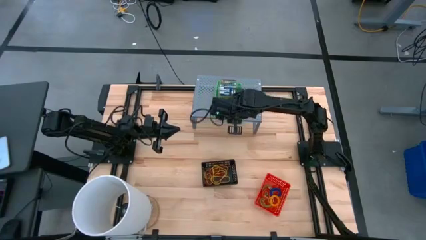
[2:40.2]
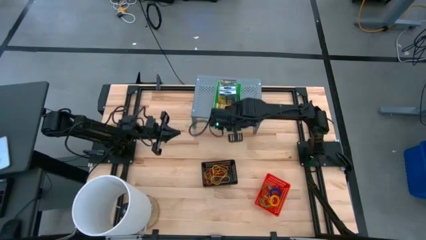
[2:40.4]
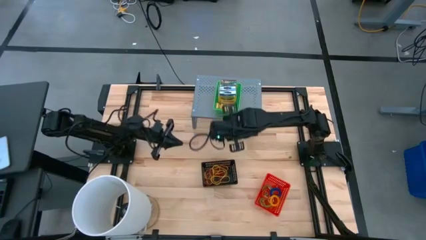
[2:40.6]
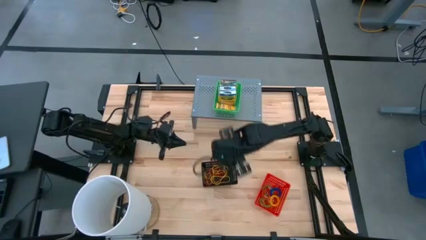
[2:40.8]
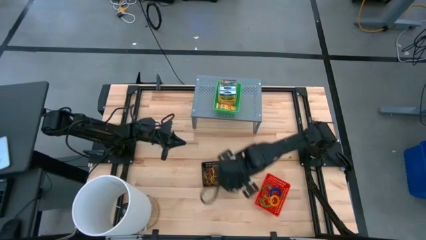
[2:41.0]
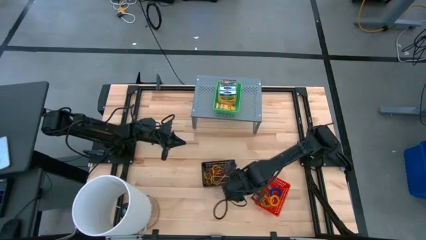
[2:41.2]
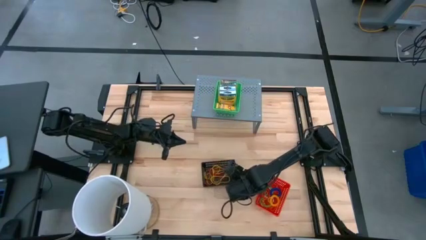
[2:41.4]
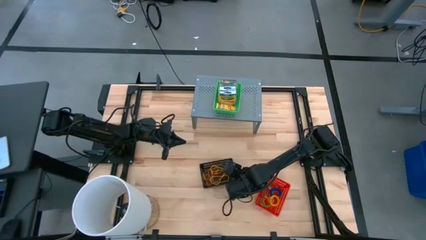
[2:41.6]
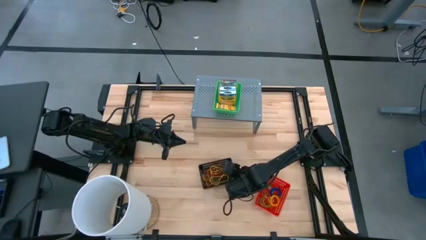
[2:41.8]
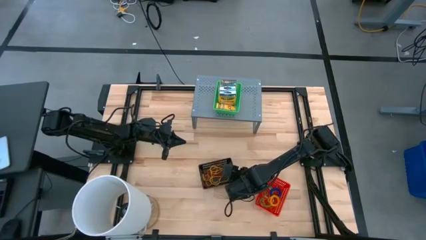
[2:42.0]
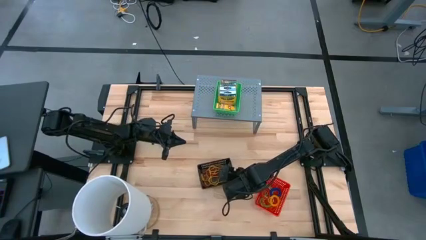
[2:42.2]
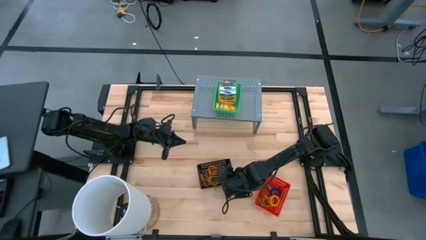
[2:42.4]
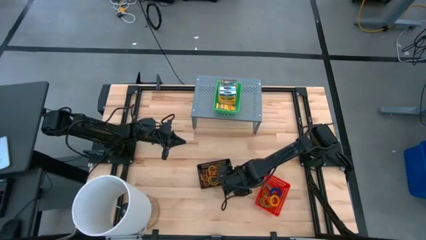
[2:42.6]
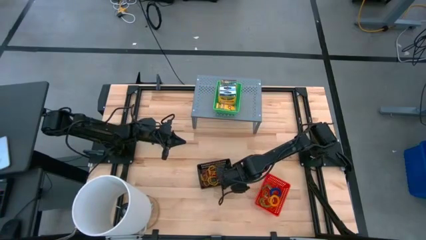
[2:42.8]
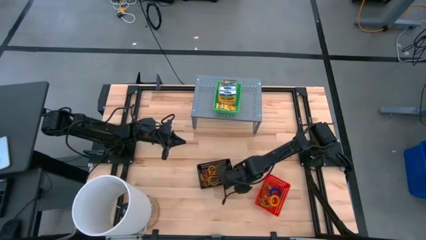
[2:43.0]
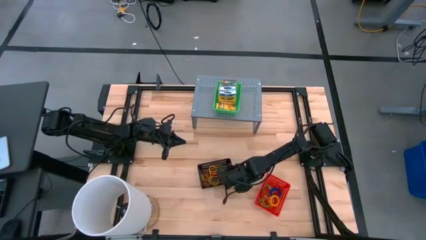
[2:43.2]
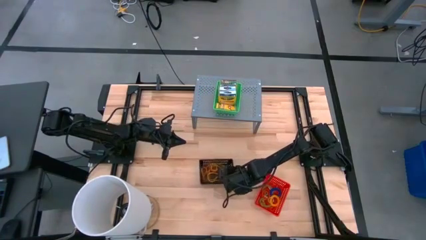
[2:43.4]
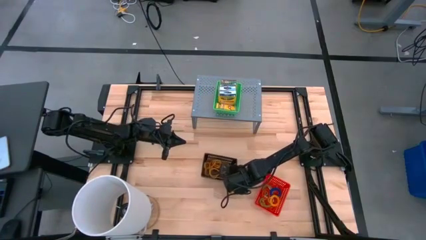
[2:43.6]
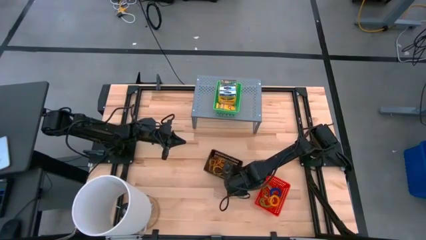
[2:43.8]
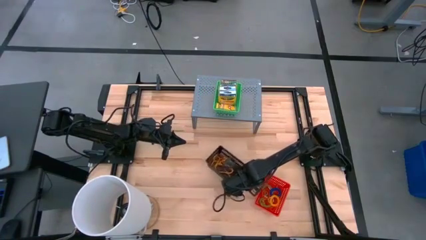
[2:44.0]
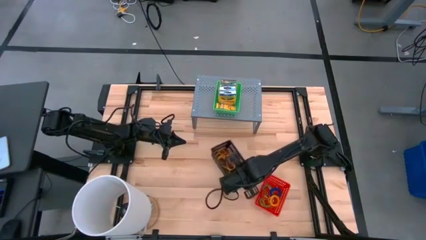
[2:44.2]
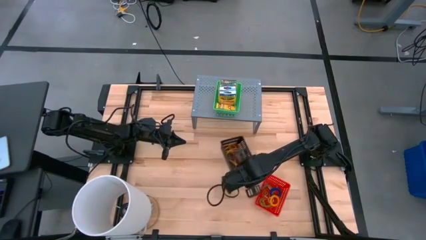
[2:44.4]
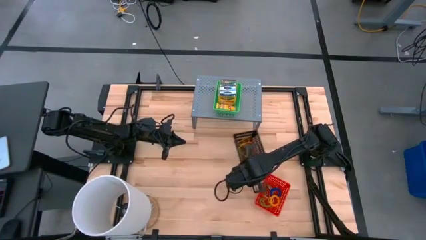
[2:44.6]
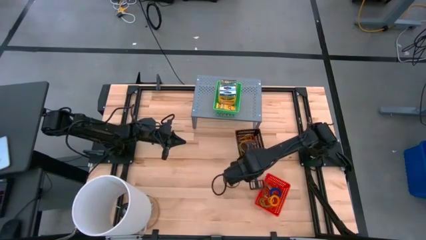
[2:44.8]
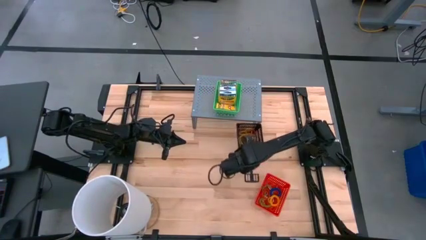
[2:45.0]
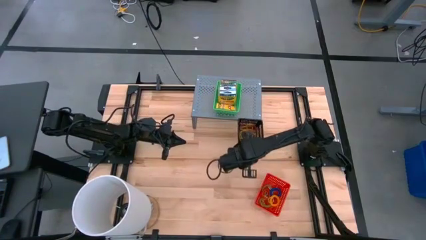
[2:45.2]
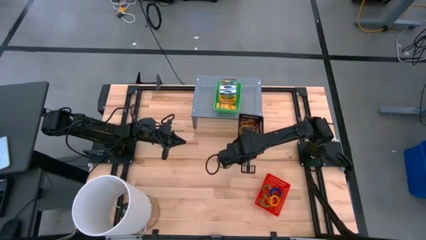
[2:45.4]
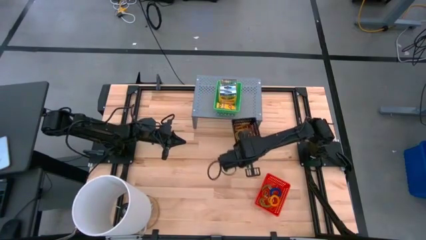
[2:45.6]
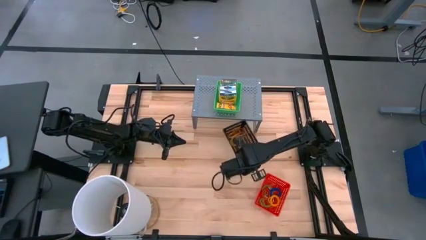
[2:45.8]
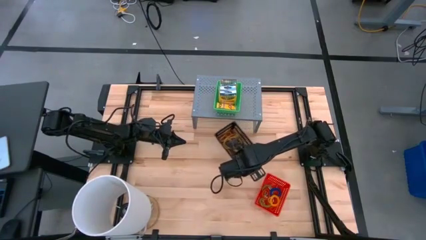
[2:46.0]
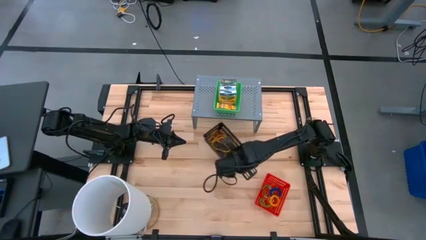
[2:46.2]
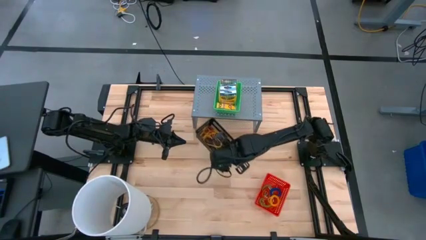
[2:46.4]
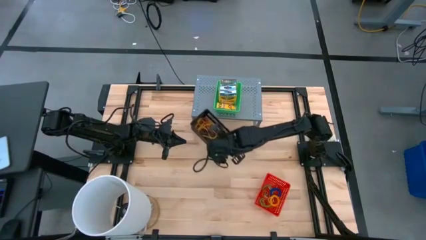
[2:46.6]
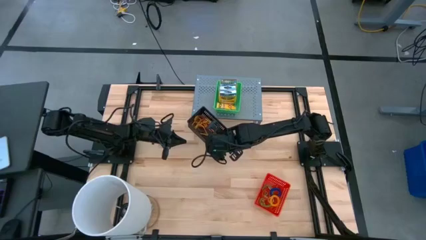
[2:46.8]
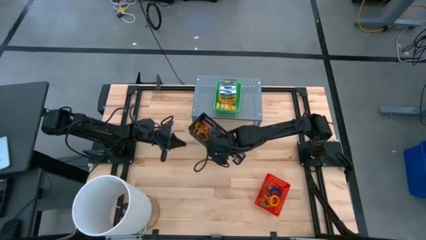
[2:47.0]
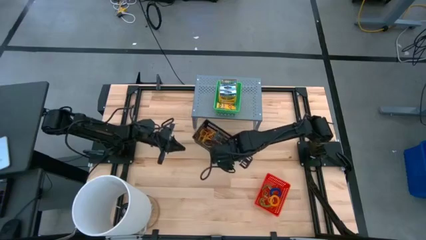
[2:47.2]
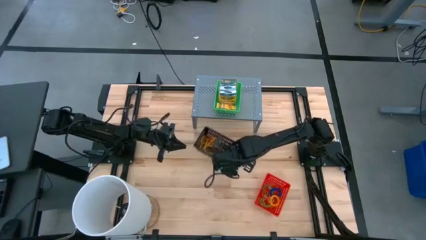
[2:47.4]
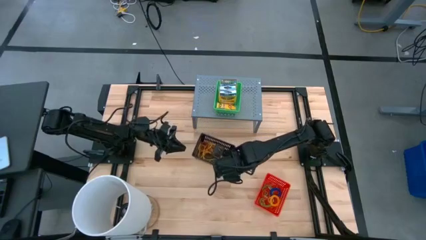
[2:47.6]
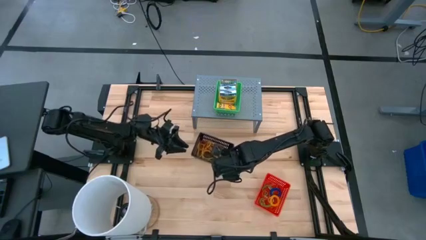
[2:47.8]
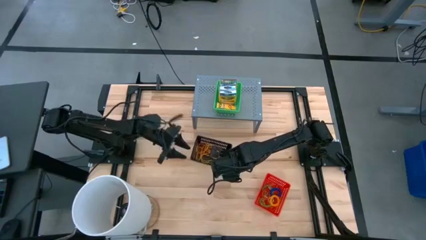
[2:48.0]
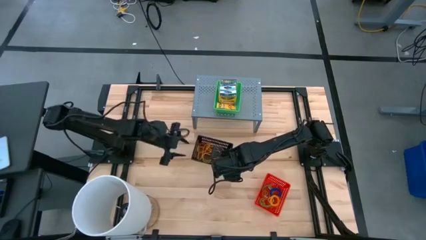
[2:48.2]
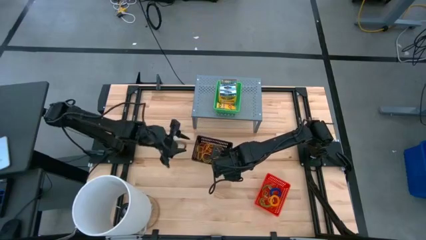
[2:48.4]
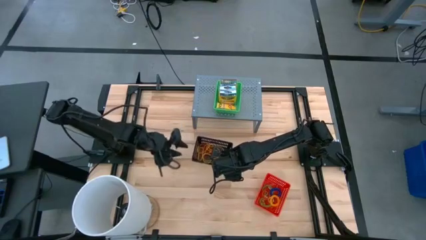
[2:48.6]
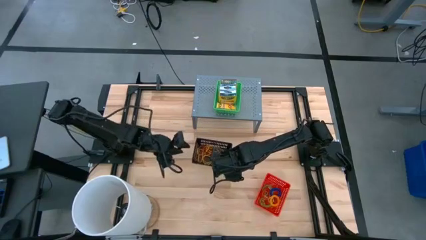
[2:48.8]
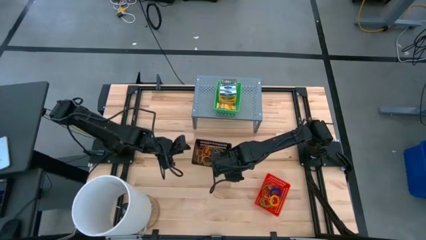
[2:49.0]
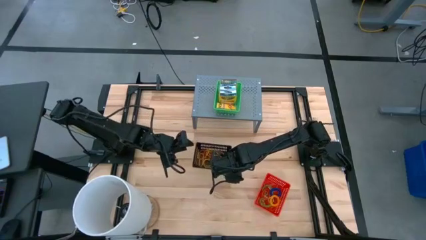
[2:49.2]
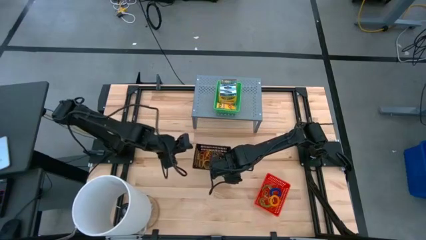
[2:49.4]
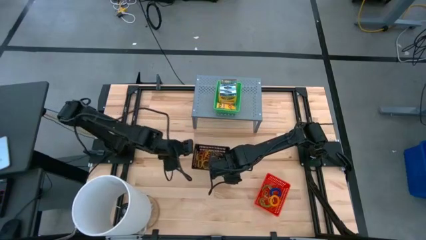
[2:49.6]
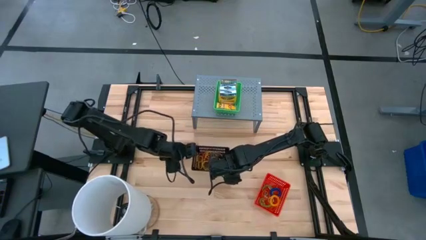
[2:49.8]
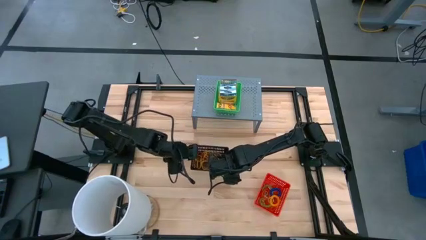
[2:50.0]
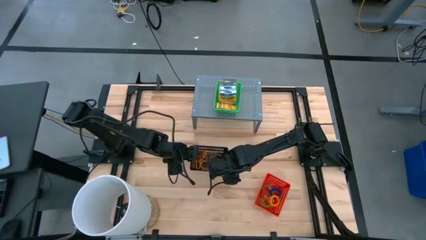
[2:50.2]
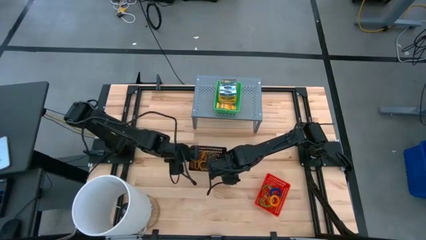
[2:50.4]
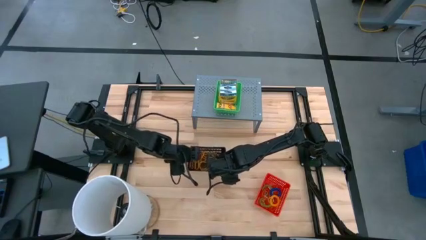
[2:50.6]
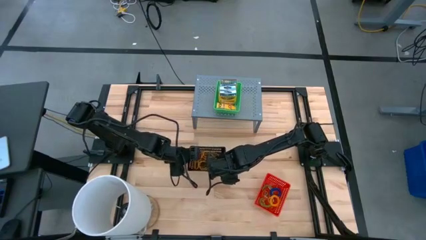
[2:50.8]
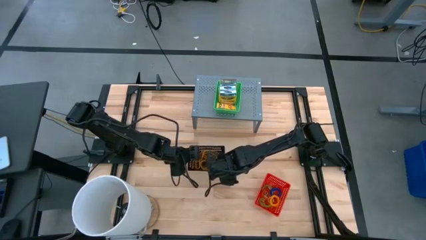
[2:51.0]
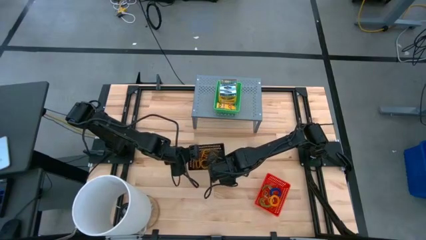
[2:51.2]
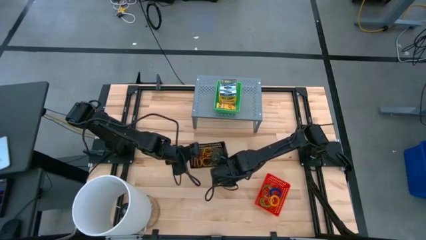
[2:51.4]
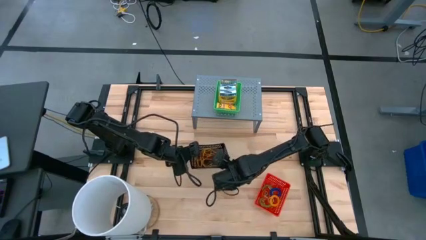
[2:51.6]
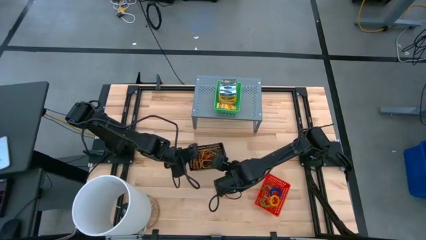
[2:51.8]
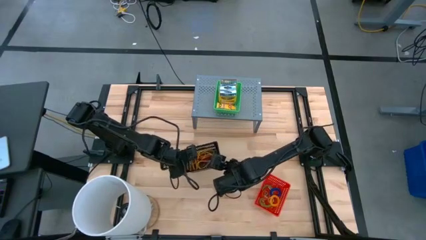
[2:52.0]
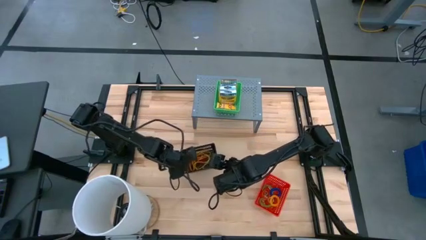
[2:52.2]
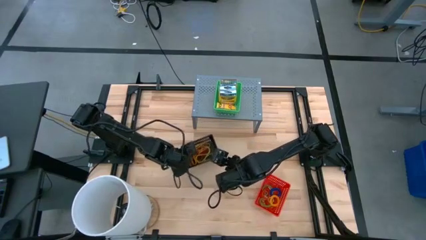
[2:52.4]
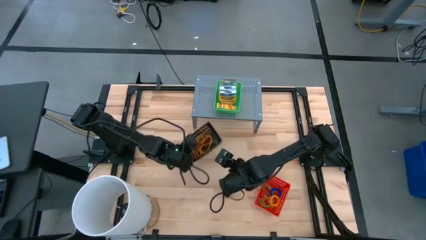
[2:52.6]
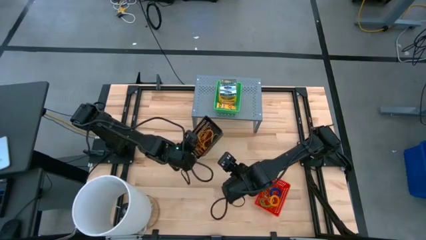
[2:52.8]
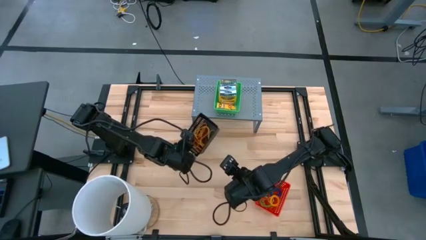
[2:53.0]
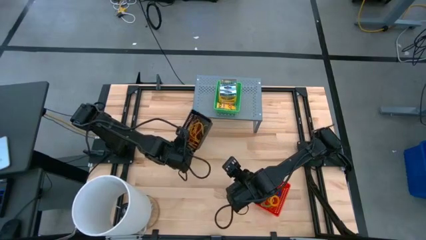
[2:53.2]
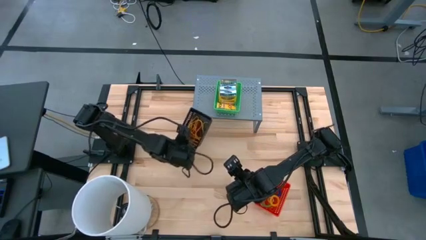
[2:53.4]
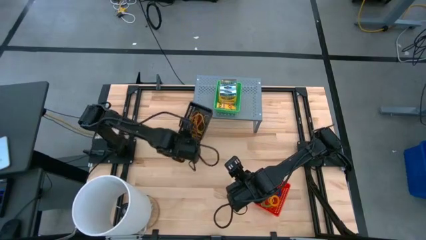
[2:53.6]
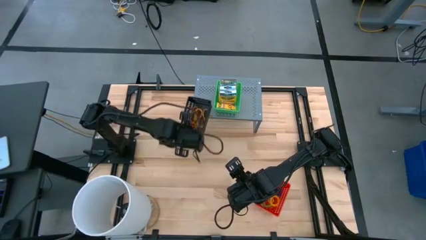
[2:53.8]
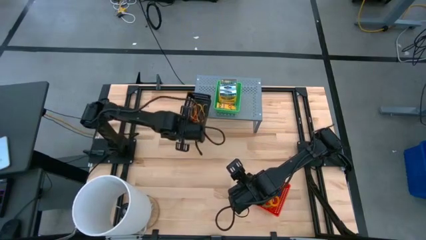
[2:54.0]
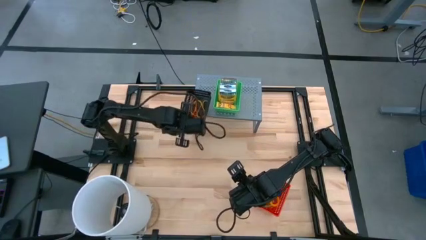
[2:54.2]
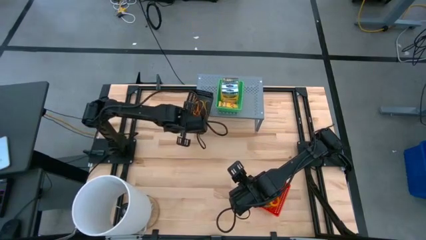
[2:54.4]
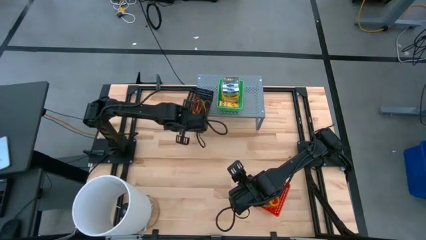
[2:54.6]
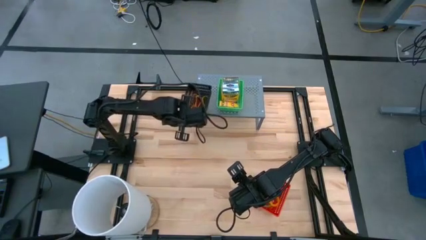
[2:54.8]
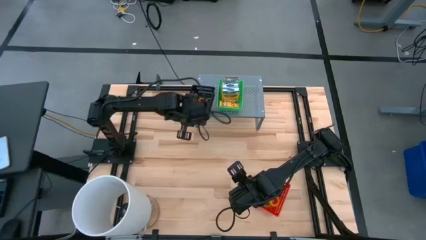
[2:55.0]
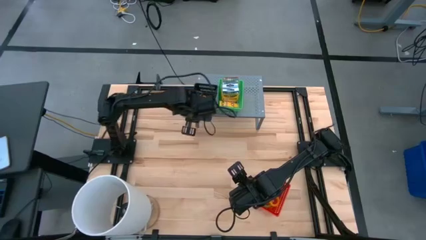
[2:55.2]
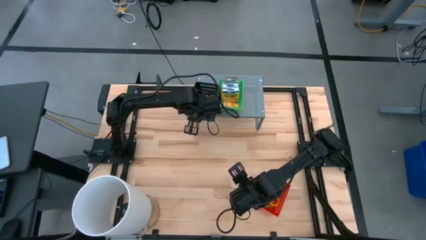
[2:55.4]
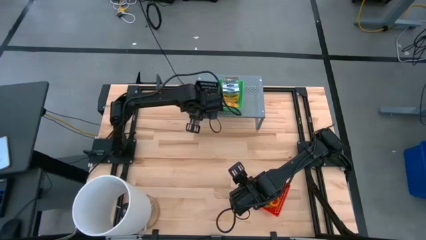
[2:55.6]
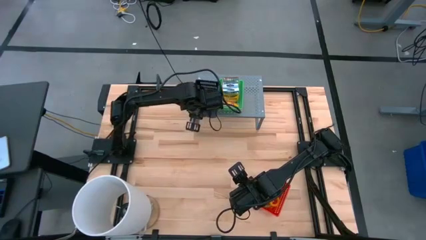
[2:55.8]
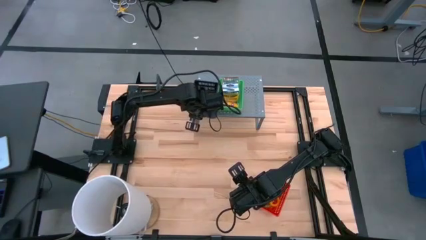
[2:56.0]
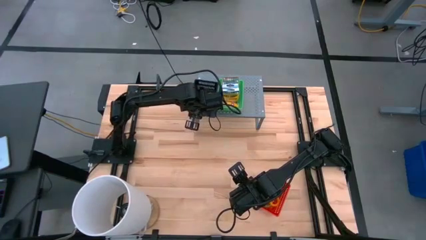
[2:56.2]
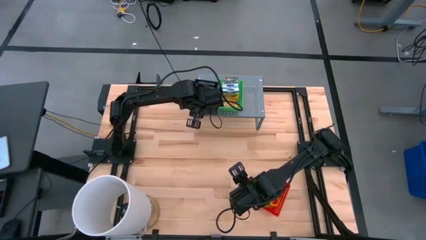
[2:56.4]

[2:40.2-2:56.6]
Task: Pick & Place Office Desk Supplies
Put the black bin on the shelf
